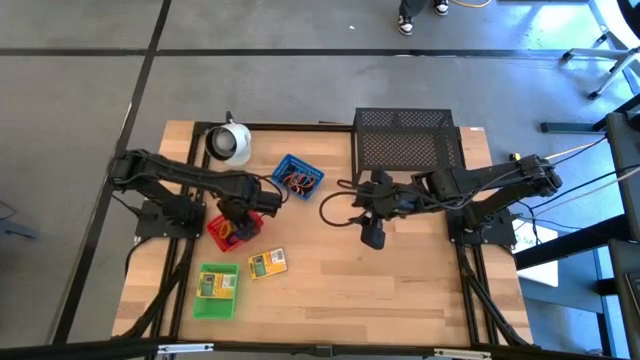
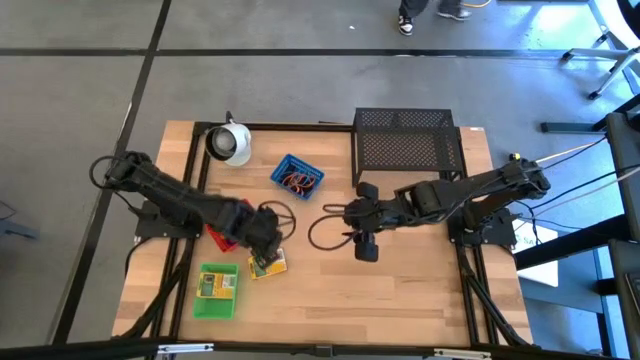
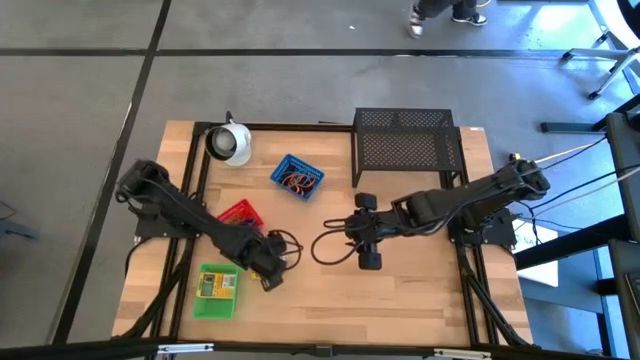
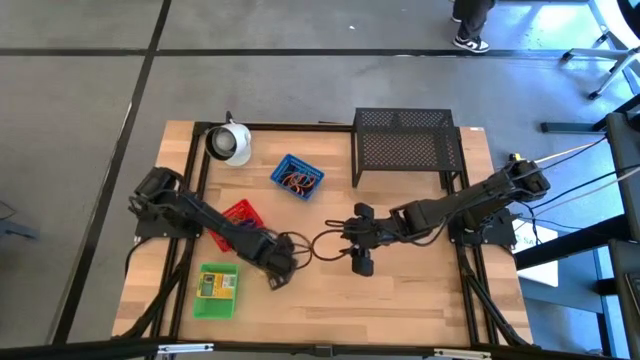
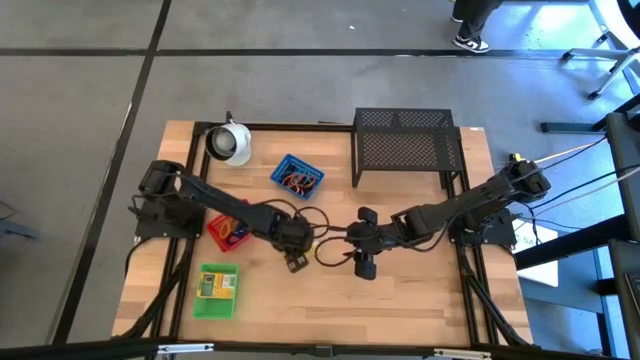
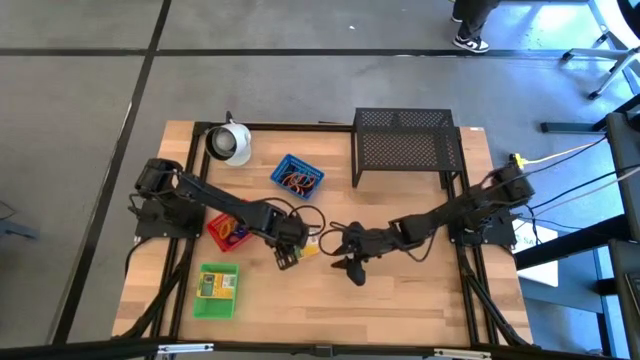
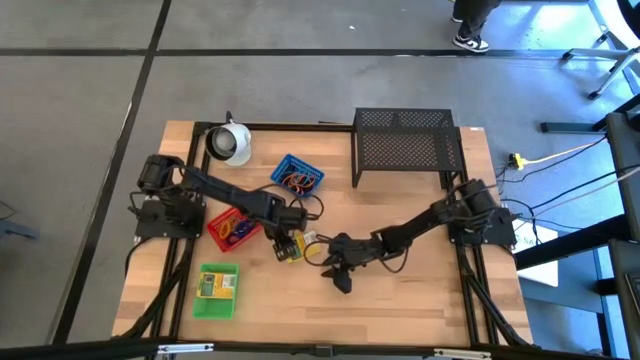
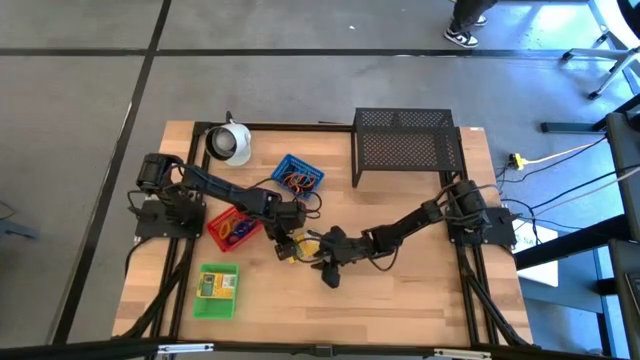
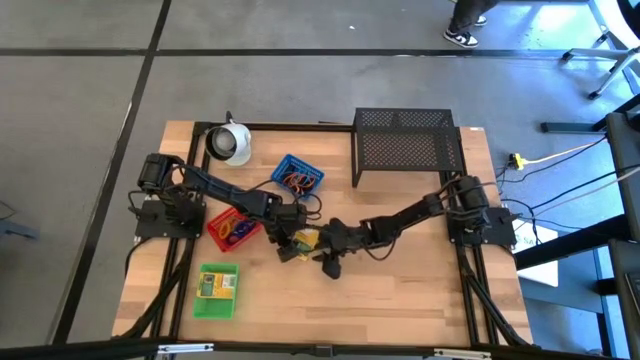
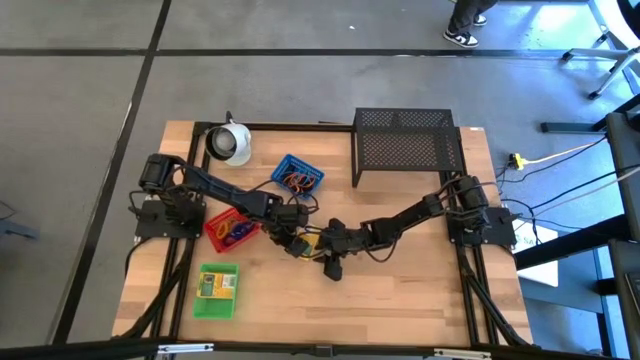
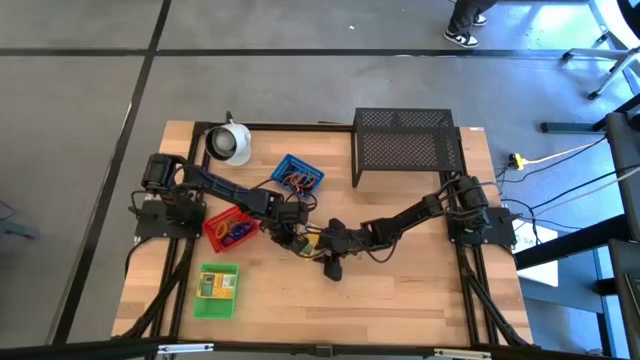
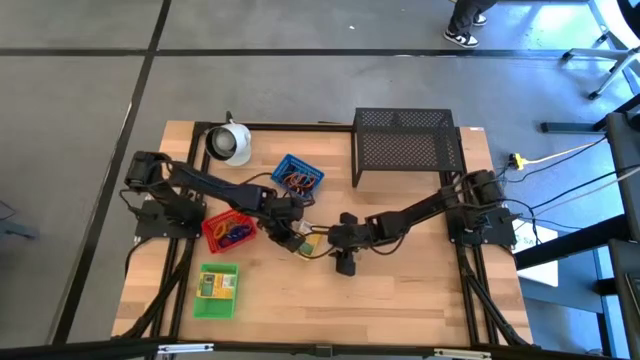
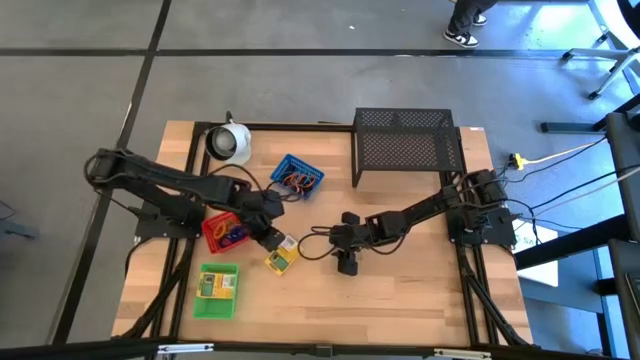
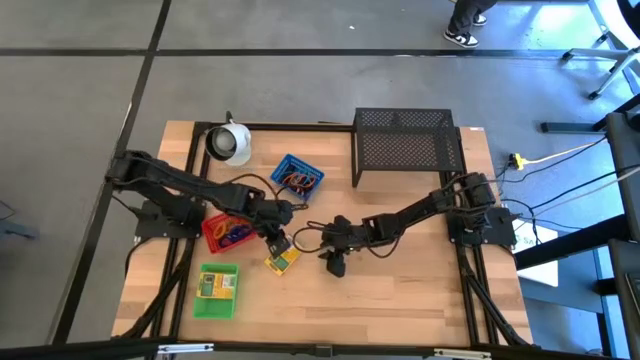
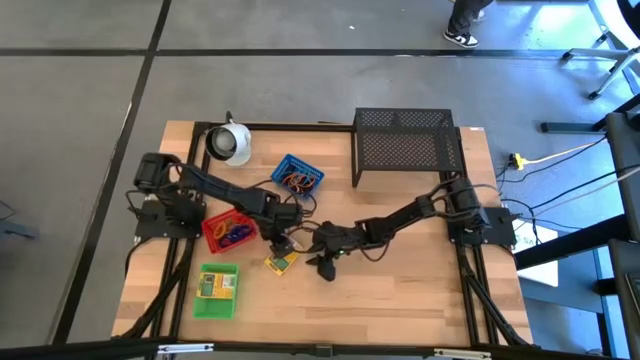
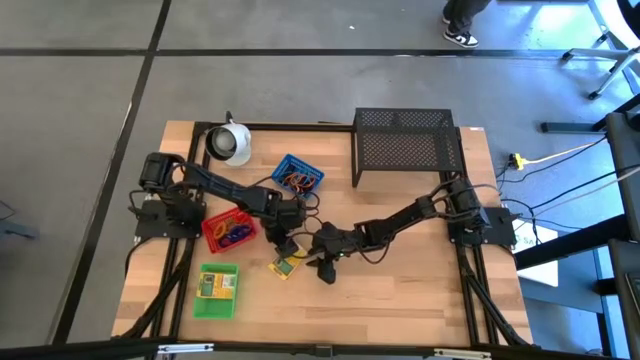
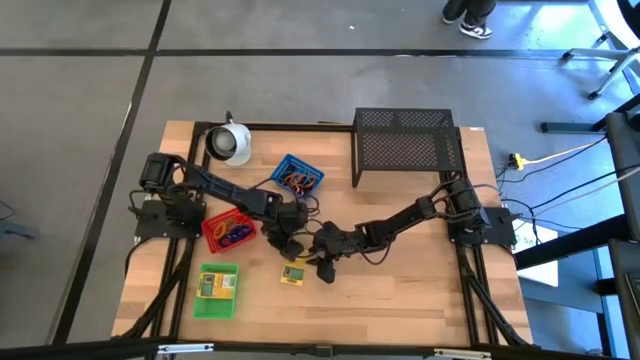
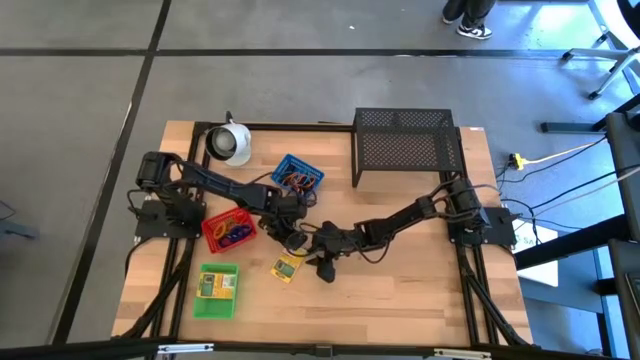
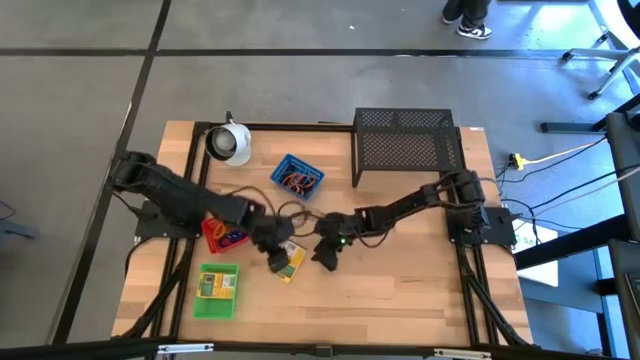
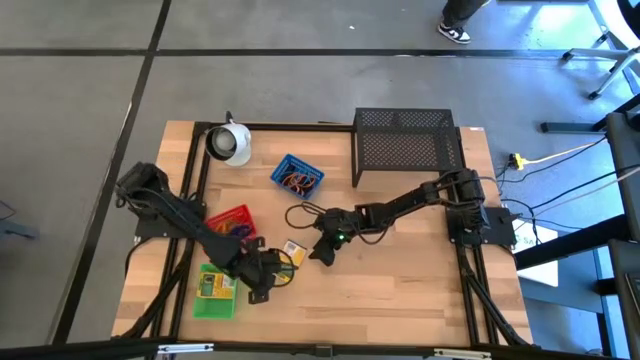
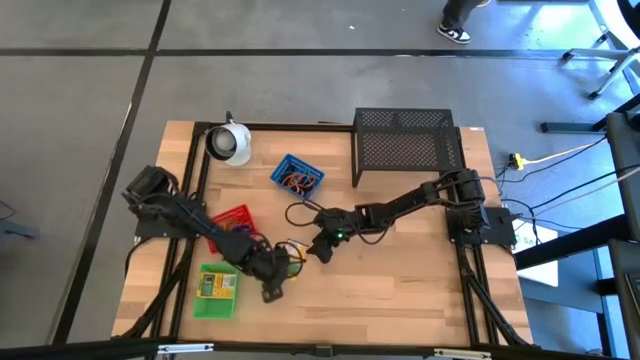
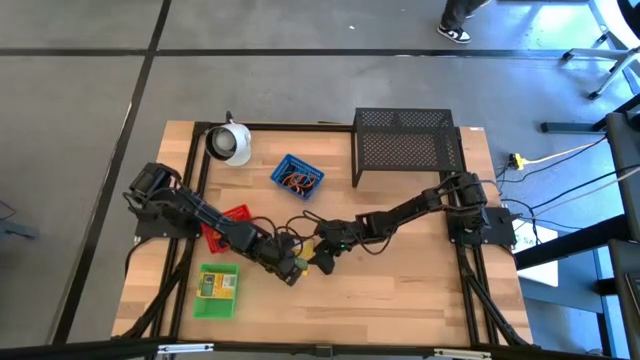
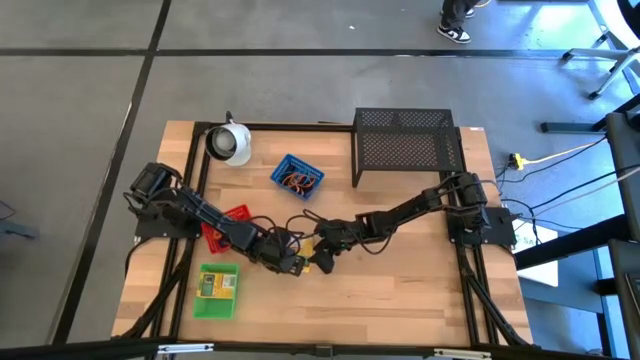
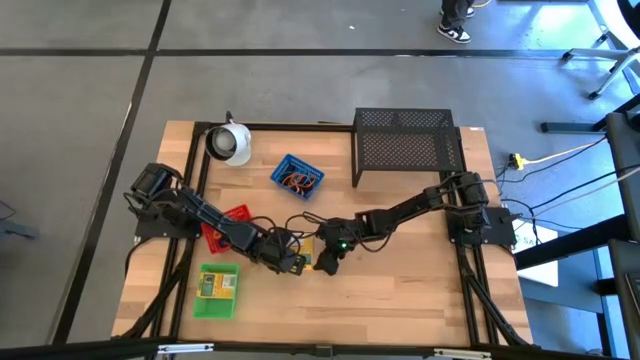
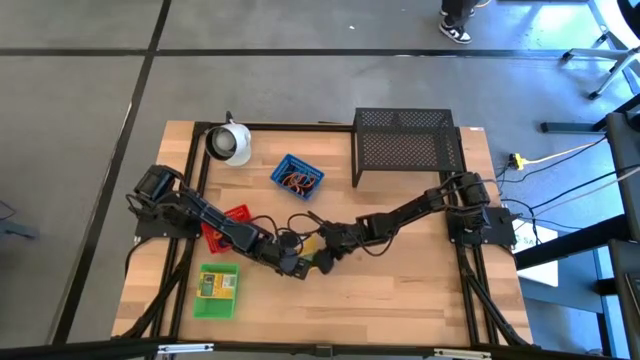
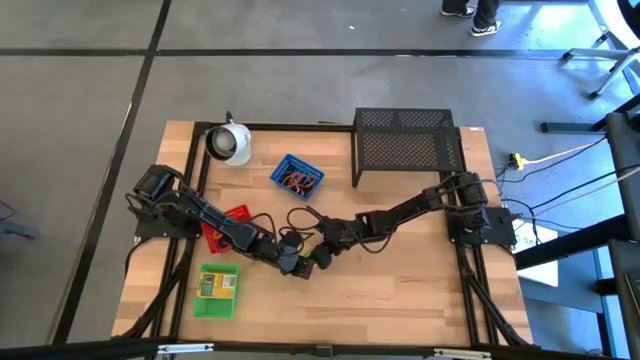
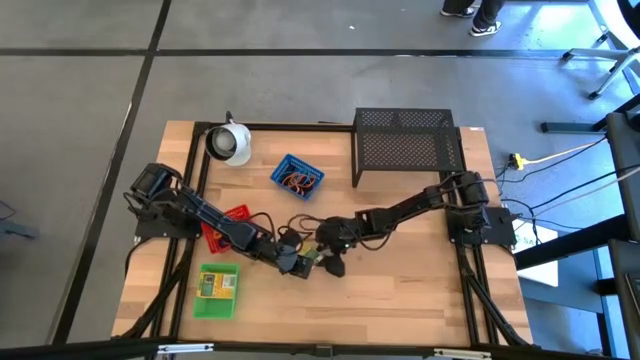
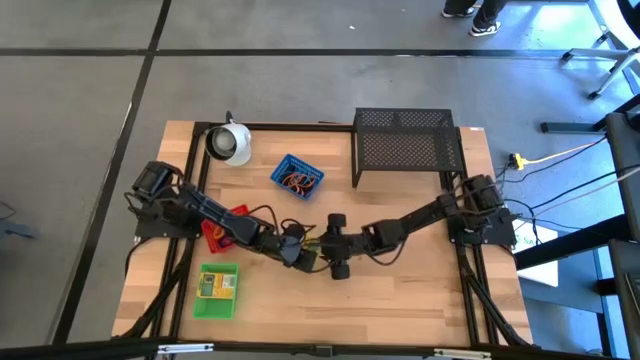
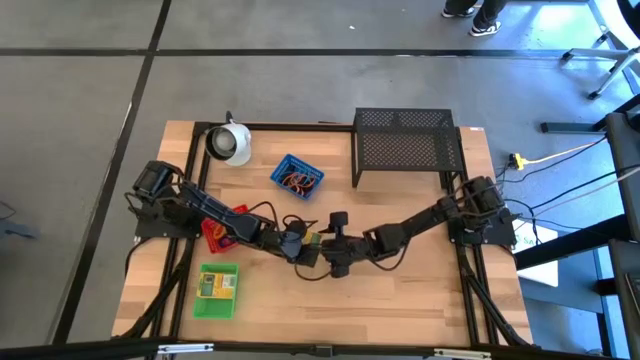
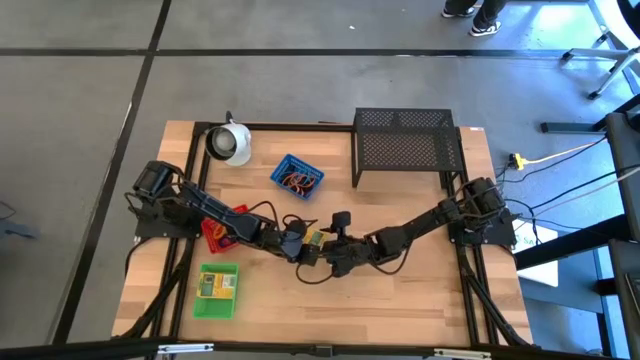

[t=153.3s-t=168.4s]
Task: Pick & Place Office Desk Supplies
Put the yellow crayon box into the green bin

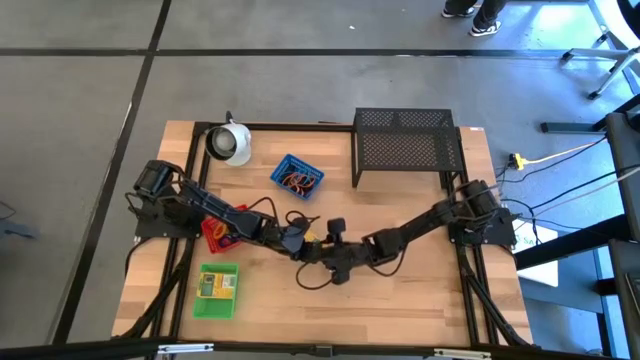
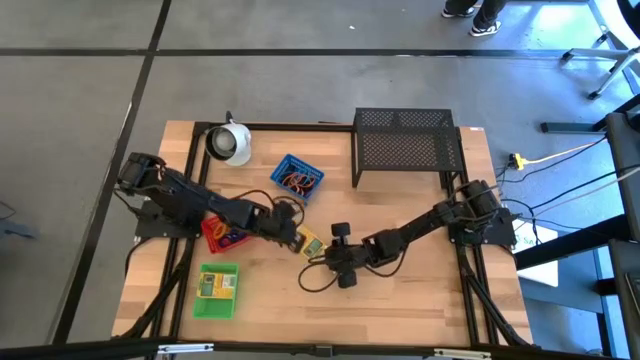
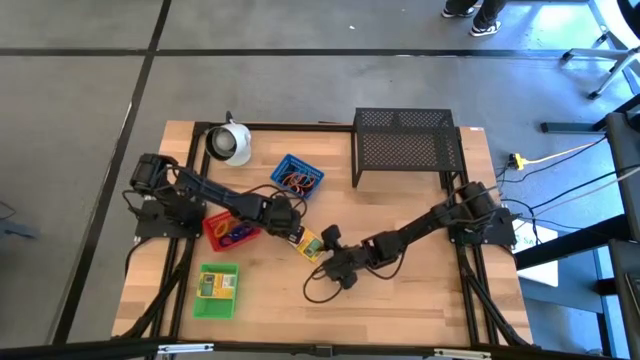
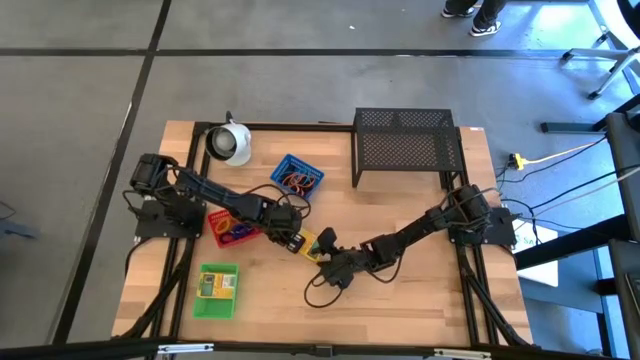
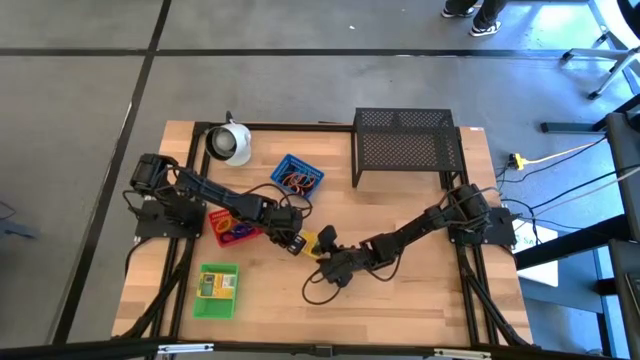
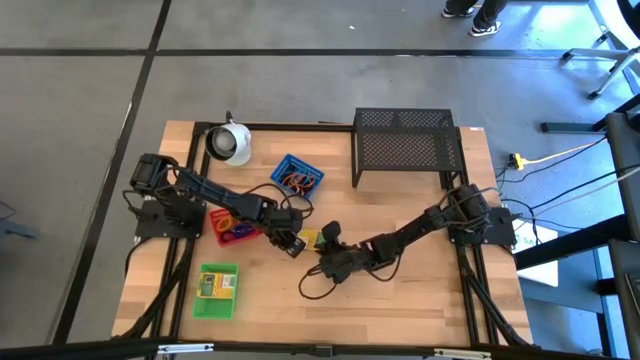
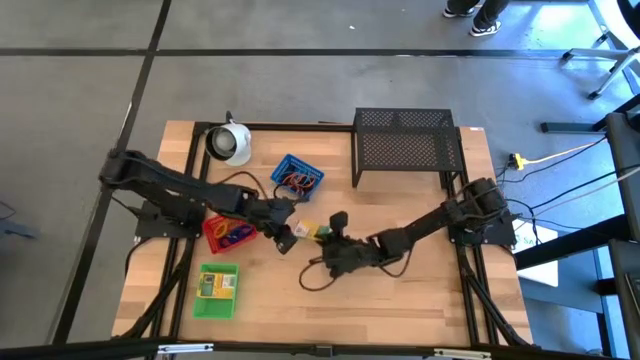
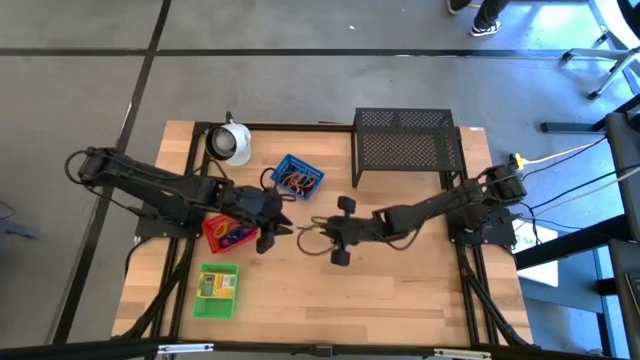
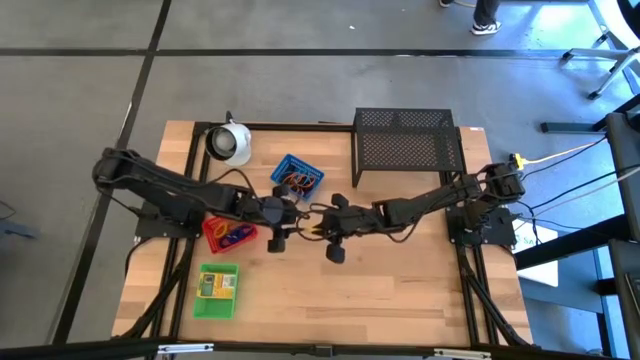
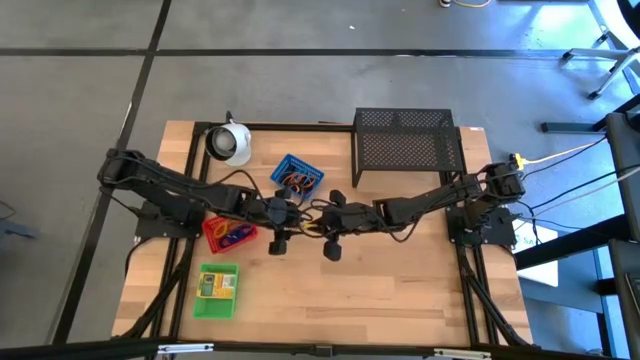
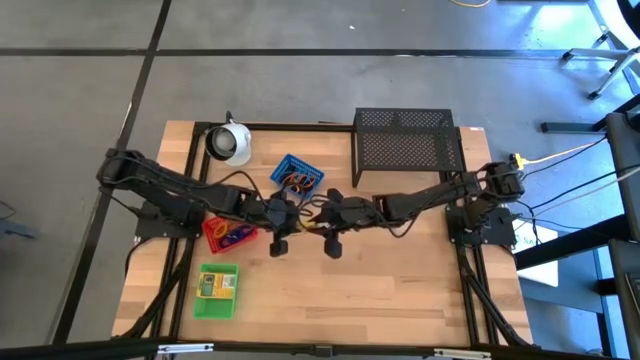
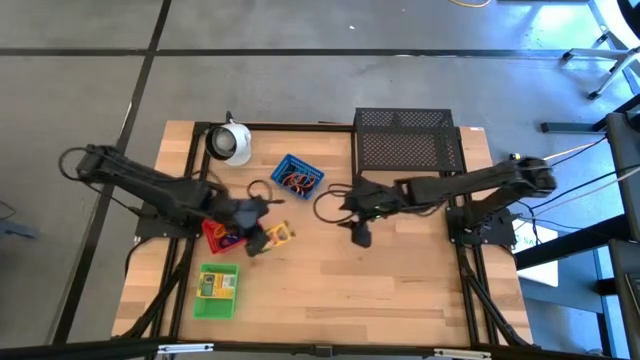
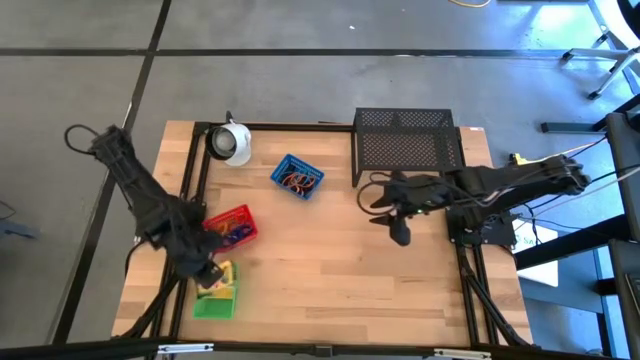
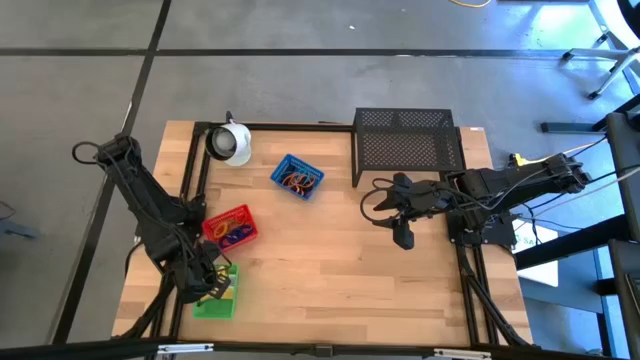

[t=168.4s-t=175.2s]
Put the yellow crayon box into the green bin
